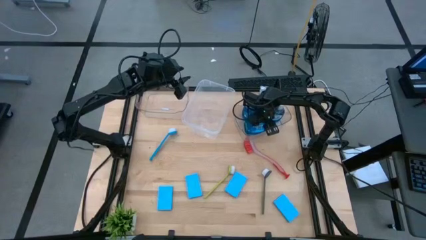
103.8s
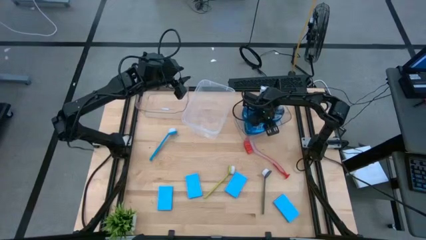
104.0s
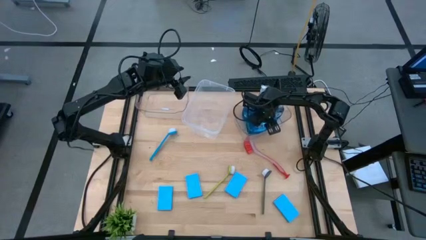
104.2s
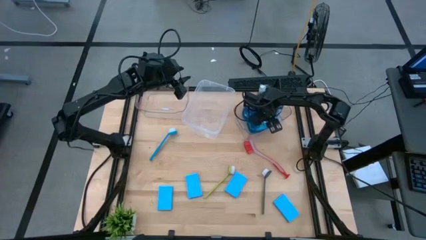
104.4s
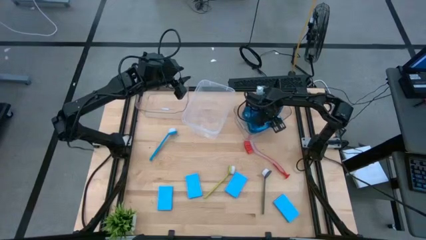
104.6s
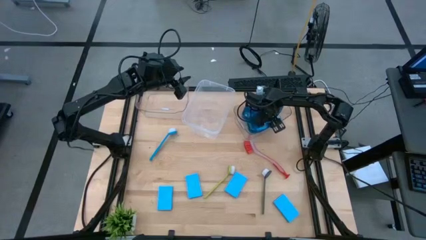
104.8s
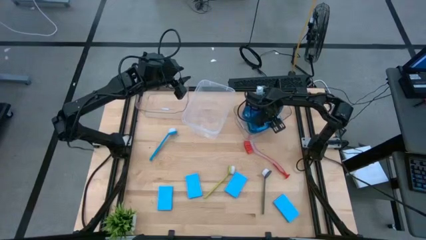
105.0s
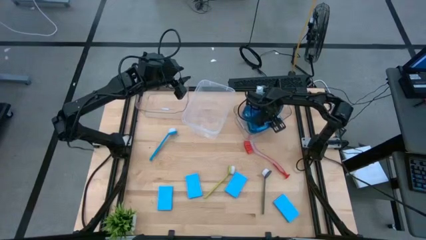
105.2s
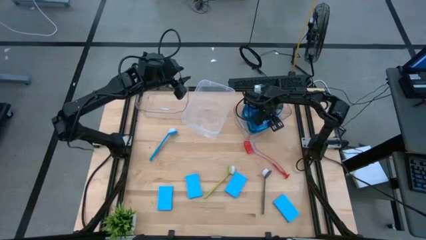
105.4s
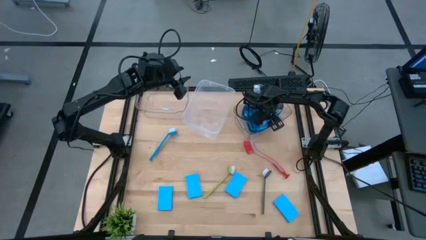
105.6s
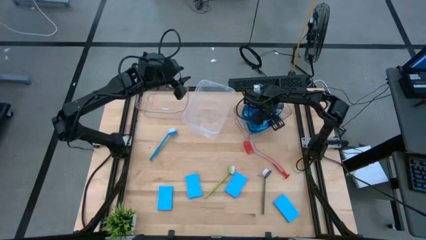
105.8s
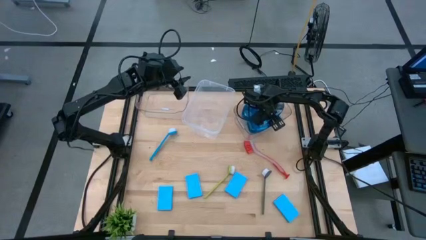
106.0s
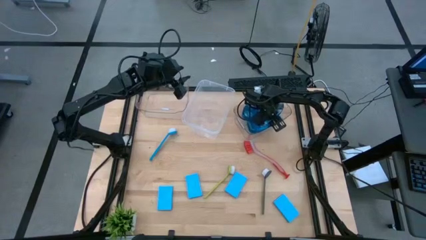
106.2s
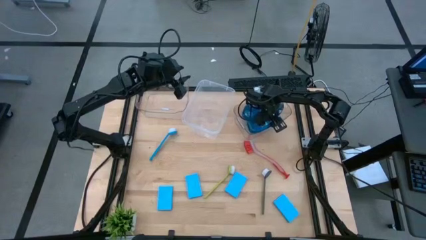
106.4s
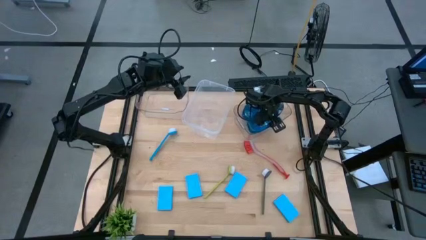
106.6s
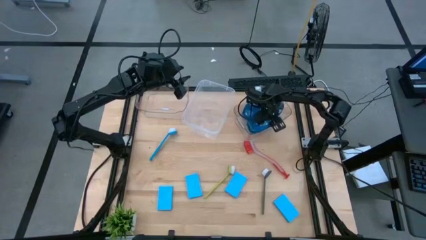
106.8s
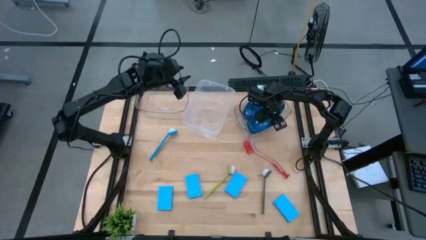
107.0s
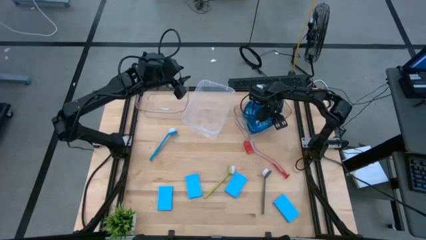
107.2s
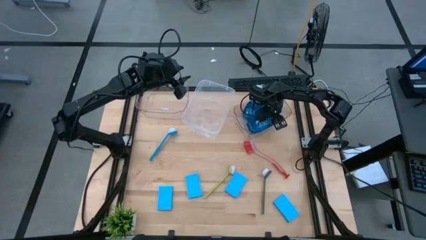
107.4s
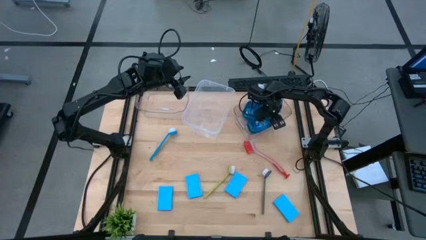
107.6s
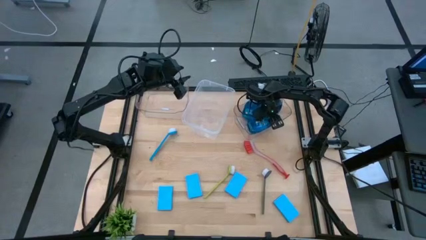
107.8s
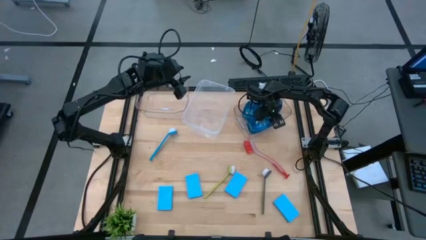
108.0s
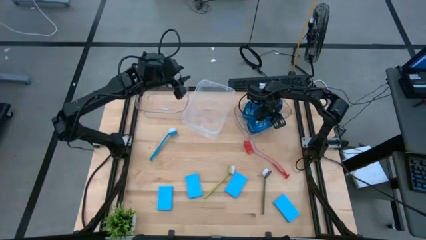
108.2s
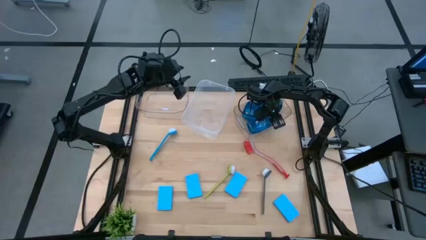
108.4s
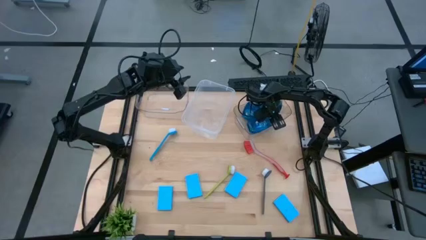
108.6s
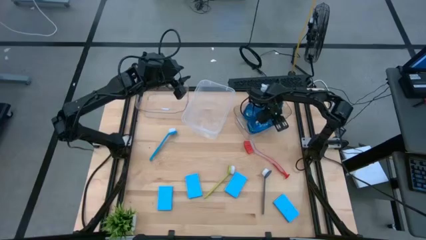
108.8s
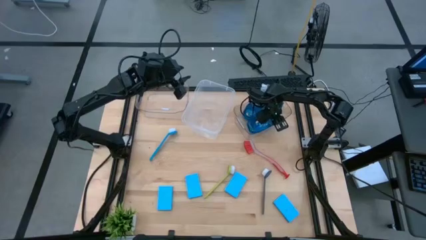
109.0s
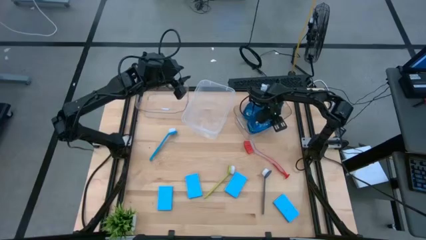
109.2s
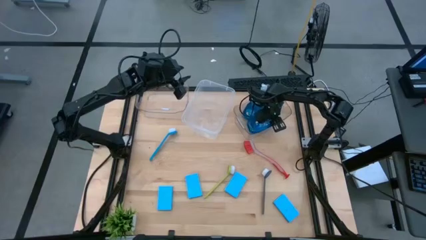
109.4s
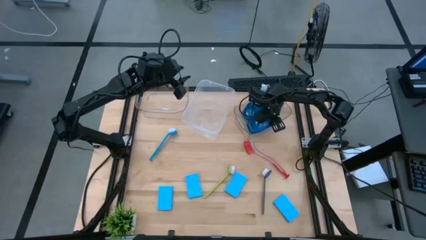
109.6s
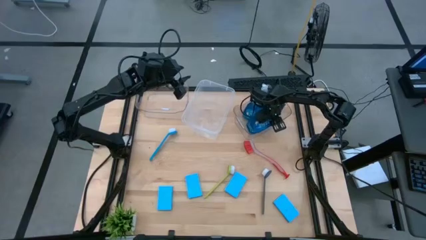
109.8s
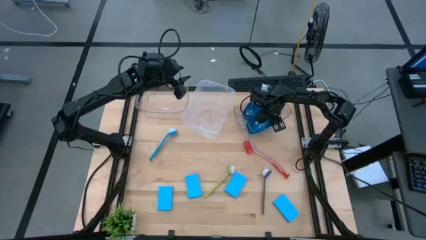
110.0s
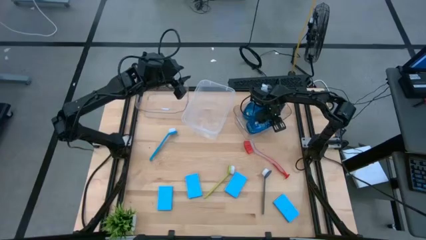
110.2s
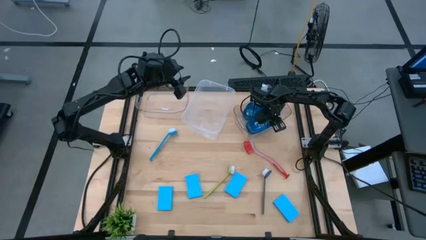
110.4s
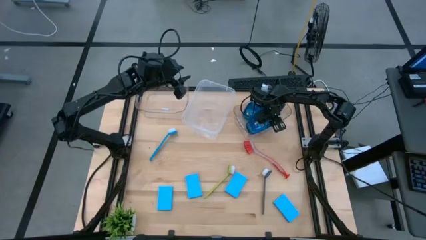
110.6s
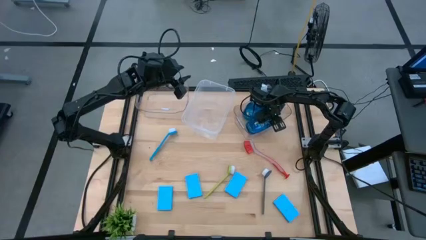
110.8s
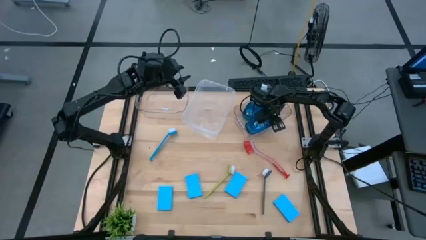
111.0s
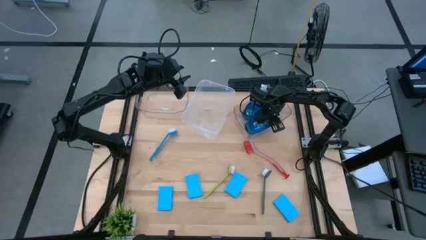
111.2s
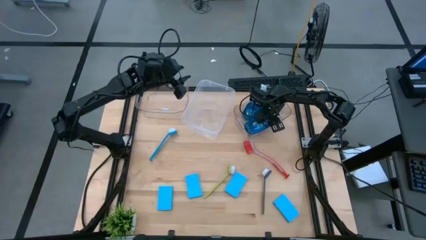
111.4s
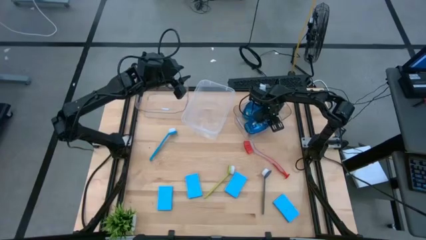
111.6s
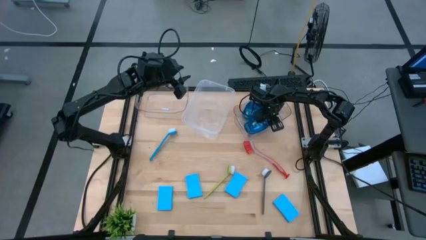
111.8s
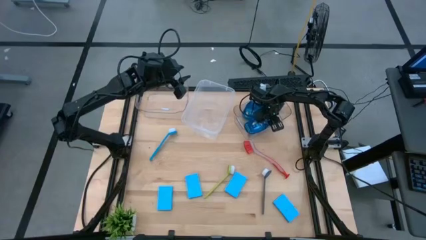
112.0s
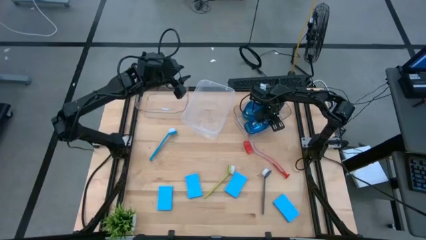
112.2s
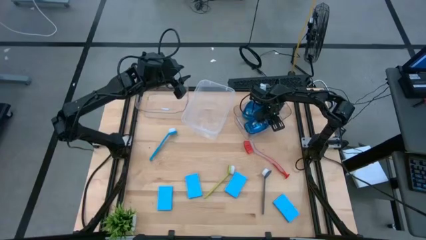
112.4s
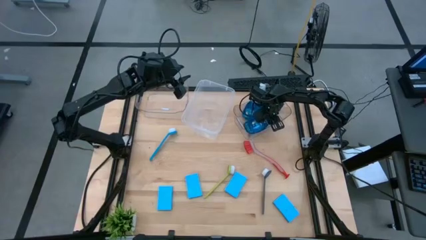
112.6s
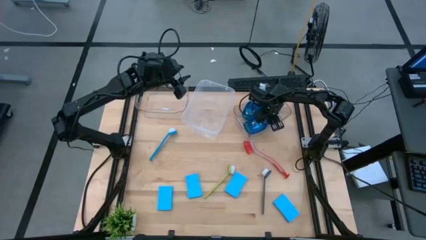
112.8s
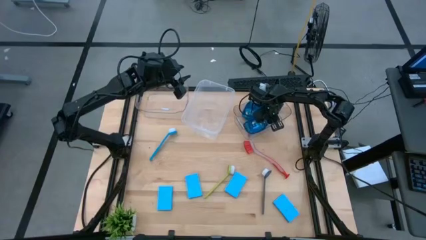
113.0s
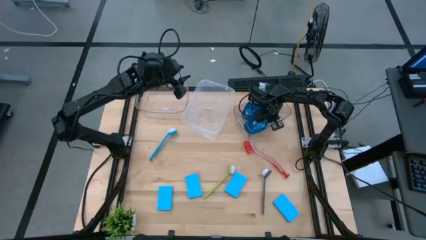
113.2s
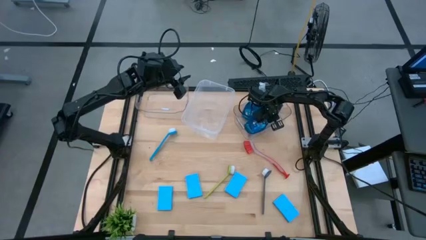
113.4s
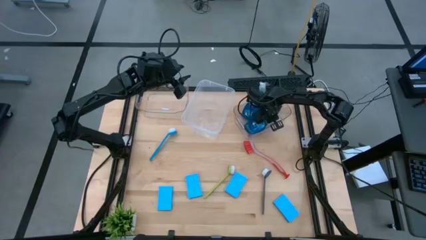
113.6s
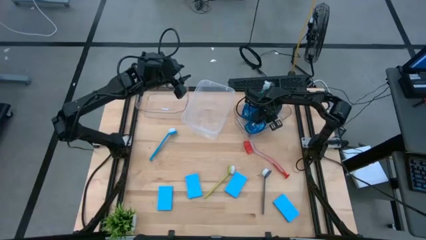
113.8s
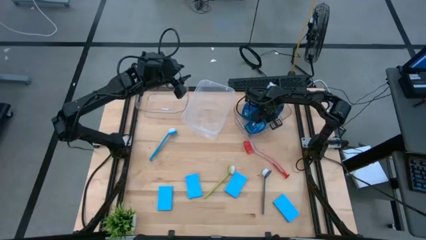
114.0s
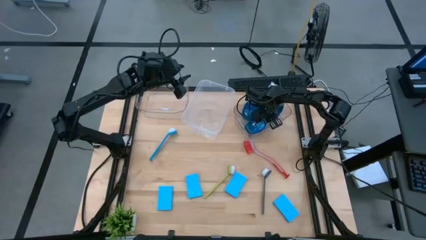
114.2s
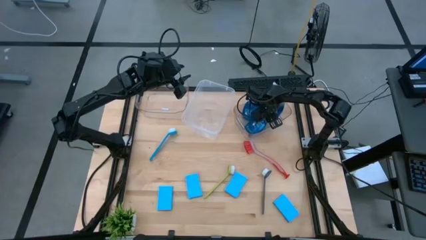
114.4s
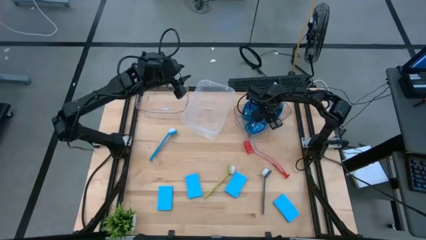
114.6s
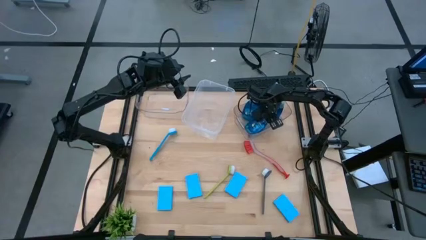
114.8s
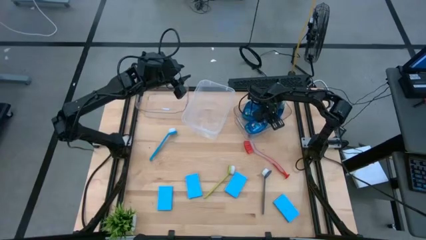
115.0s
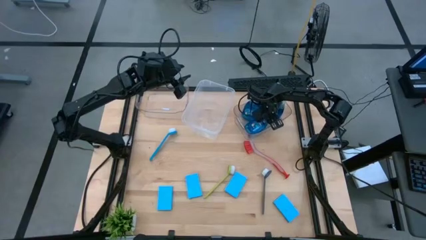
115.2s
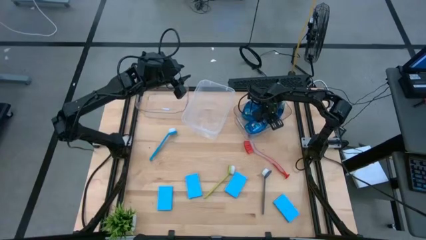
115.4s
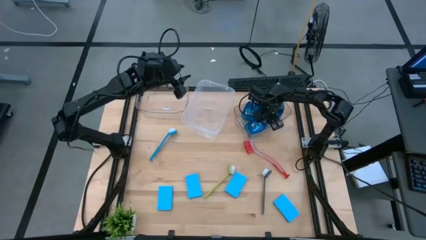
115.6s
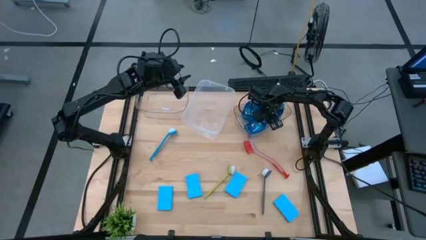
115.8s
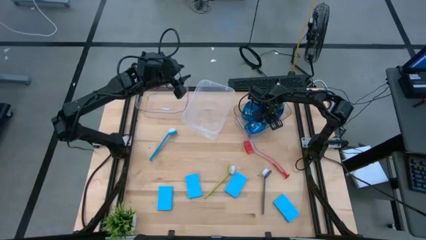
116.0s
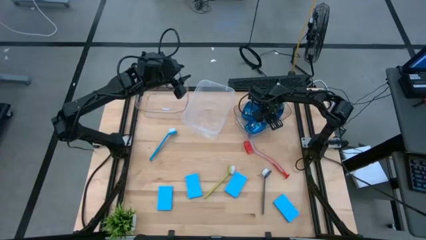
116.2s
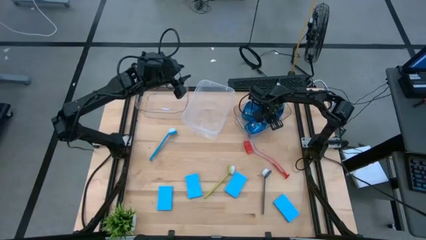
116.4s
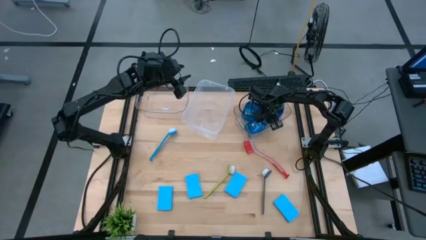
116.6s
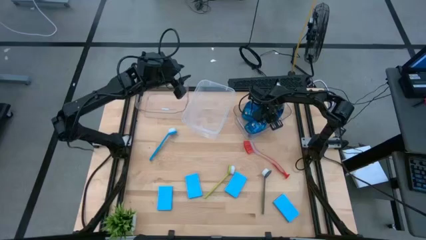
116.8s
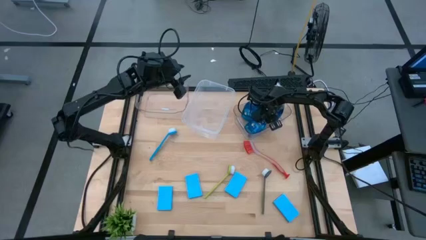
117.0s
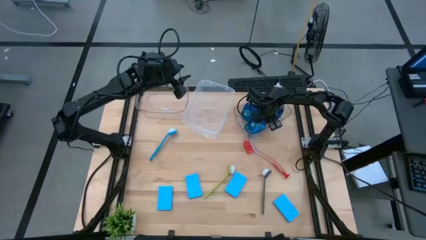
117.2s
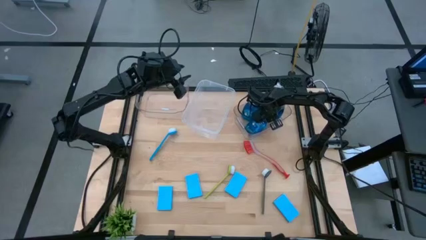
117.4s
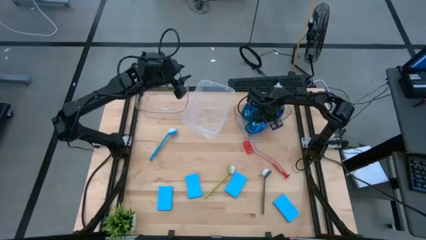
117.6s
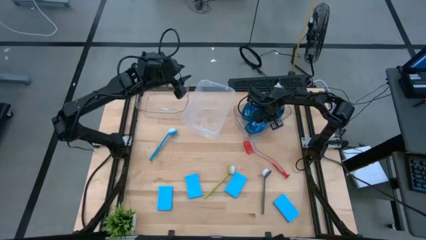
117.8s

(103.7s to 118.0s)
Task: Pick & Place Kitchen Sink Supplies
Put the blue soap dispenser into the right transparent bin

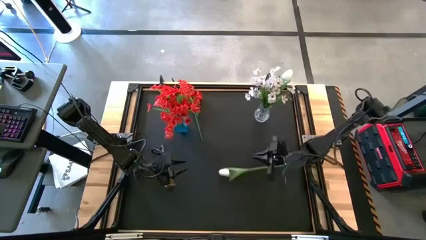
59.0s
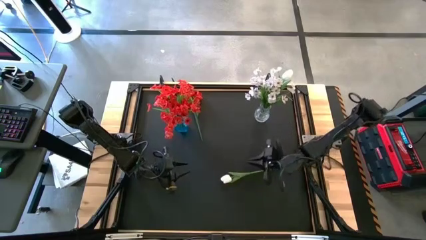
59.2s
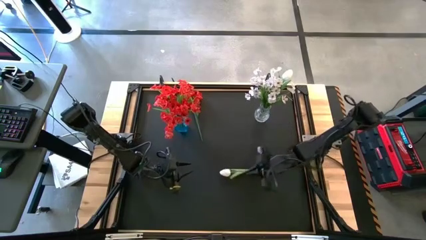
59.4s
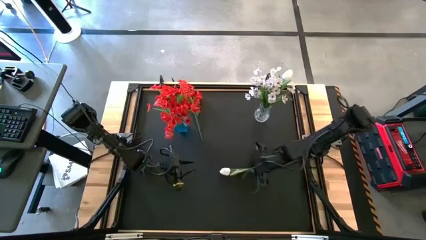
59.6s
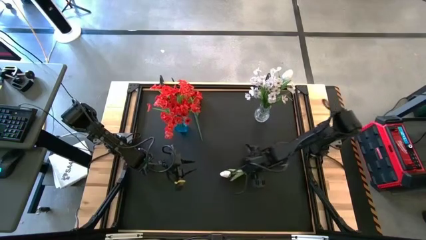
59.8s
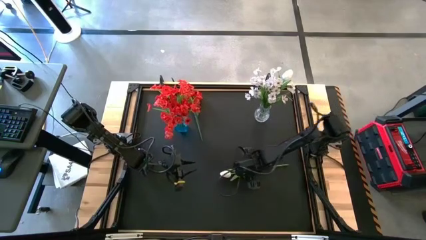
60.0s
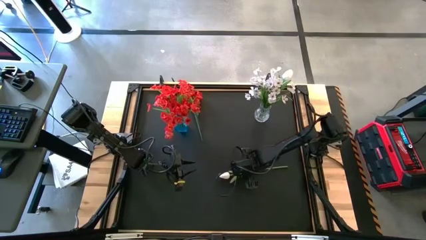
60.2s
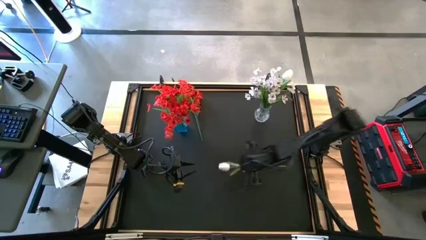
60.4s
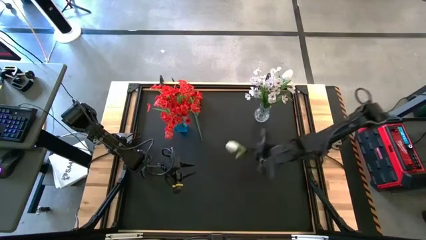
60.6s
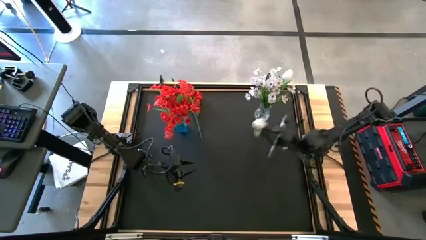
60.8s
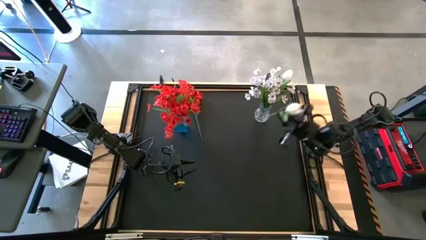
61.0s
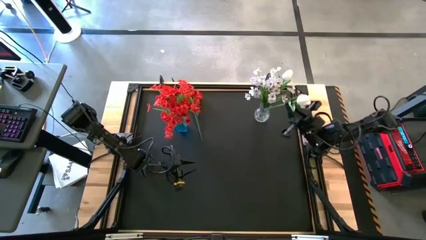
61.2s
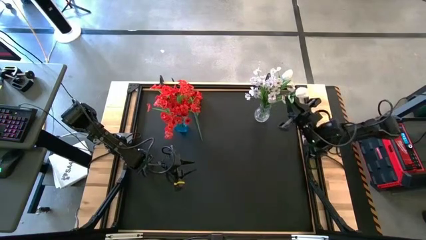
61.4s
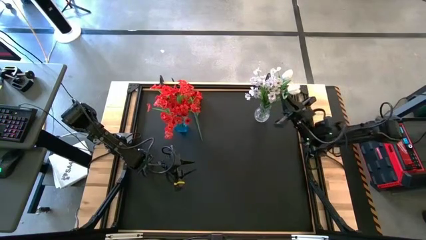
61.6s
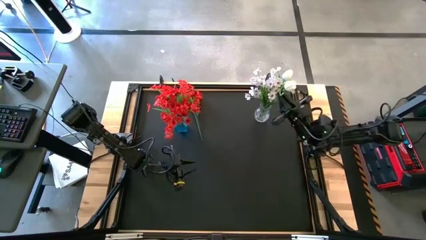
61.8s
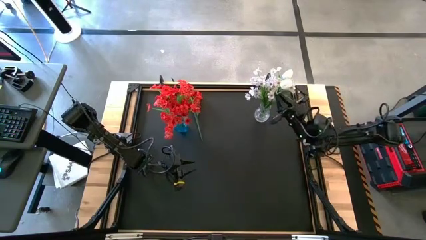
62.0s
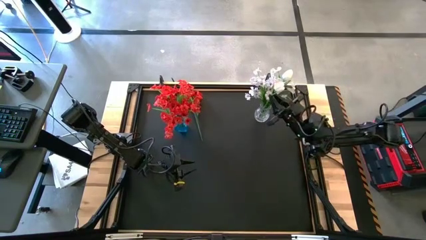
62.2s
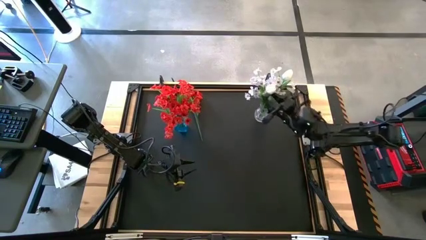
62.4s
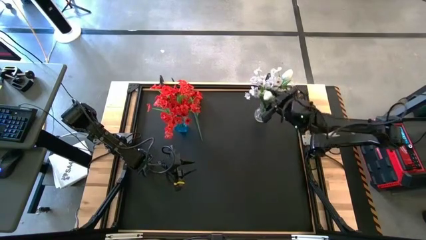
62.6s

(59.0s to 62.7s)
Task: Sort flowers into vase by color
Put the white flower into the transparent vase
